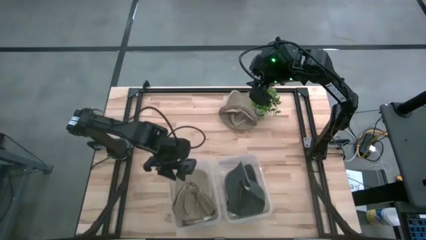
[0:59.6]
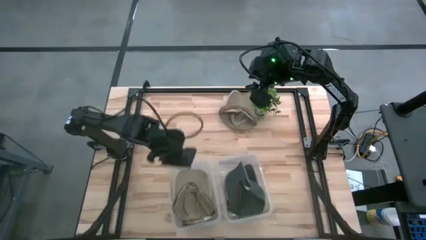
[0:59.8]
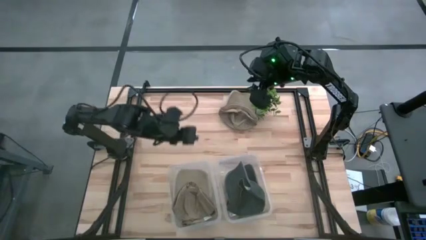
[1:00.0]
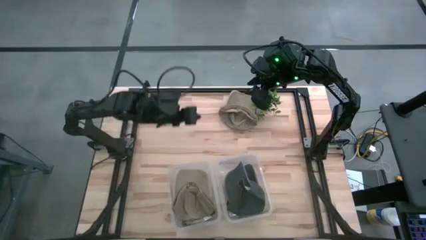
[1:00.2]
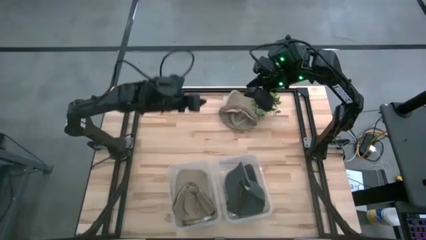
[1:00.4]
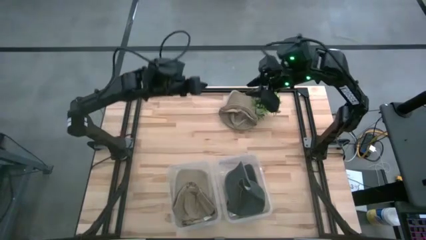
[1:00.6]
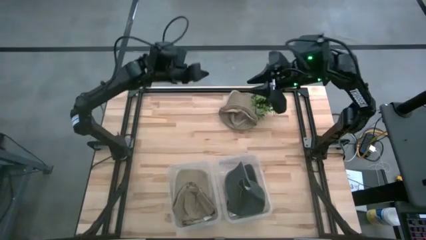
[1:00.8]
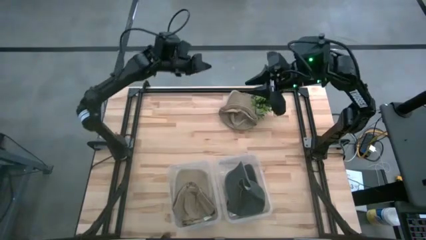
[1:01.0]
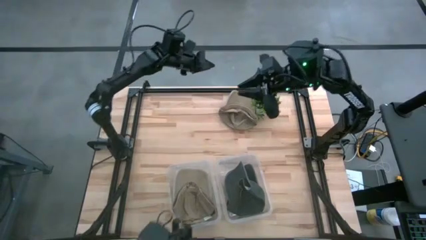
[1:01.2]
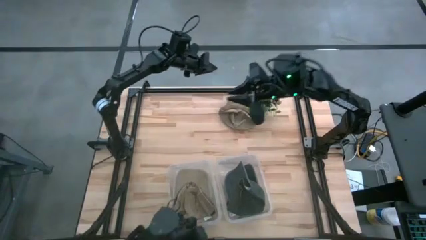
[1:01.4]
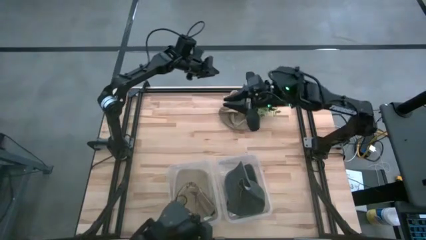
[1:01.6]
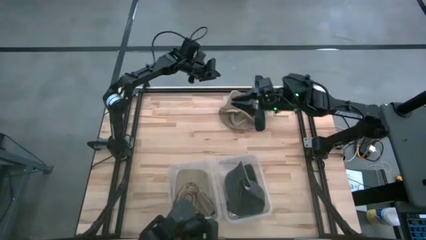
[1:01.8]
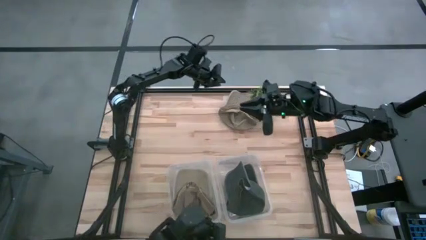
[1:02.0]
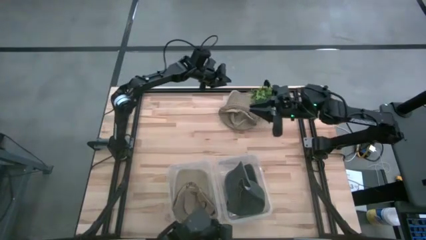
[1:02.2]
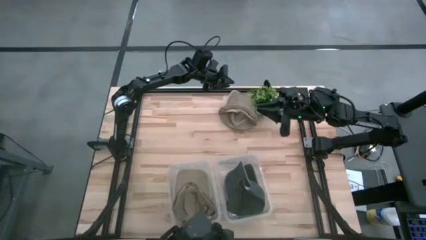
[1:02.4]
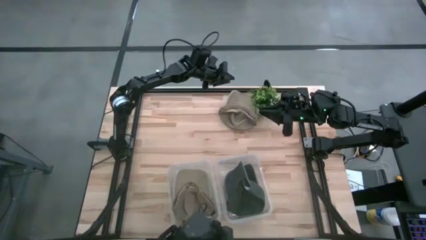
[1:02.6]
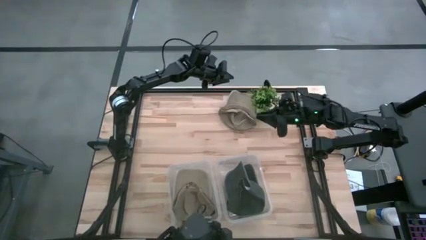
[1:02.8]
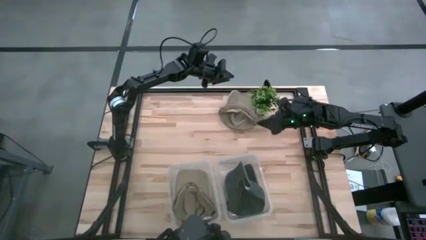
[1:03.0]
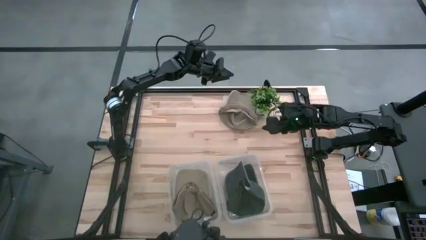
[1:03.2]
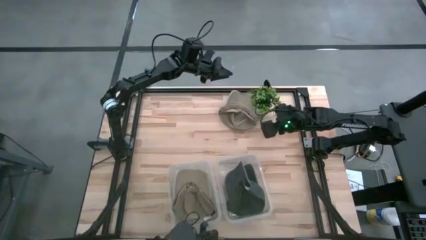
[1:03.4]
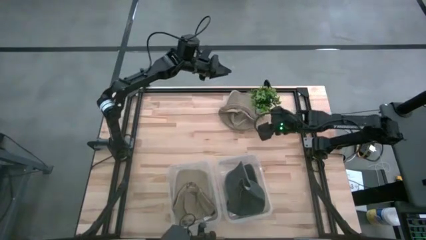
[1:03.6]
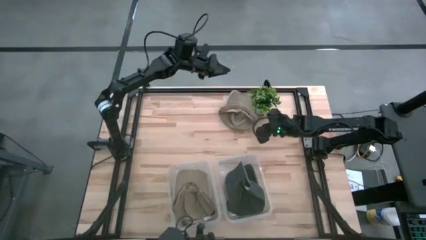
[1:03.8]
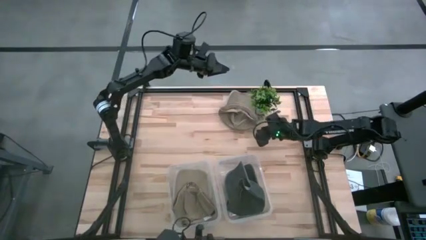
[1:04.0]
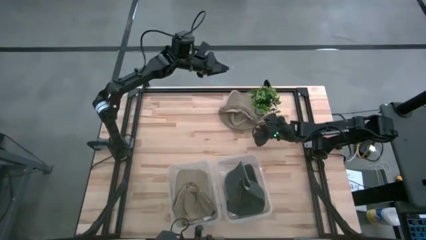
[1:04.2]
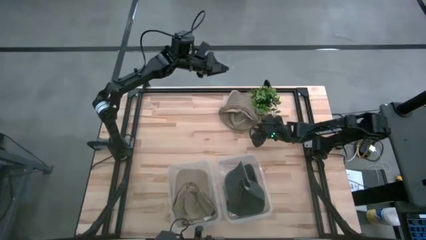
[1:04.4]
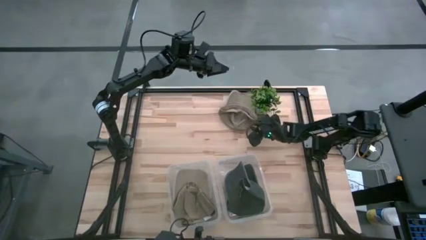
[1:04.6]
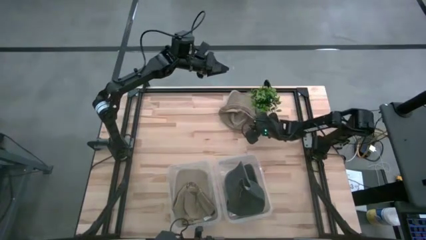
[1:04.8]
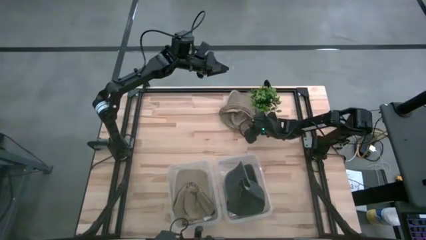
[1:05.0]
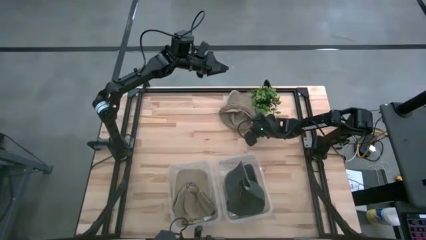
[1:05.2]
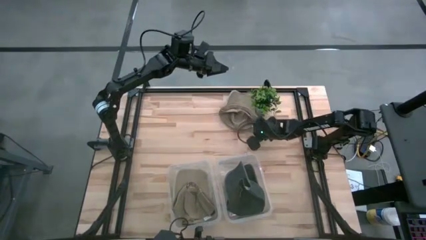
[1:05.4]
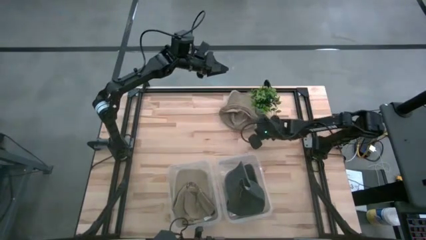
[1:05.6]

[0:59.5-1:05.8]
Task: Pick & Place hat
Put the brown cap into the left transparent bin

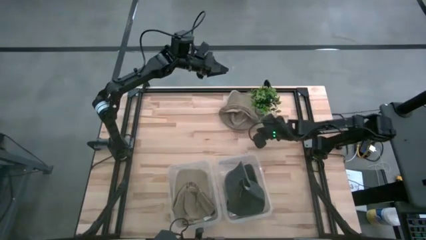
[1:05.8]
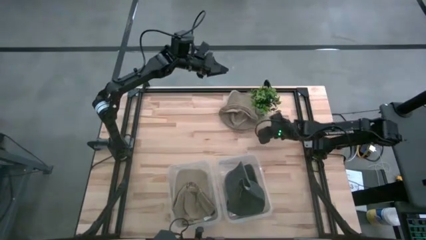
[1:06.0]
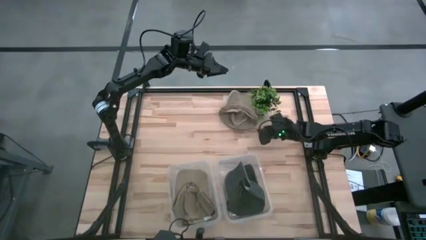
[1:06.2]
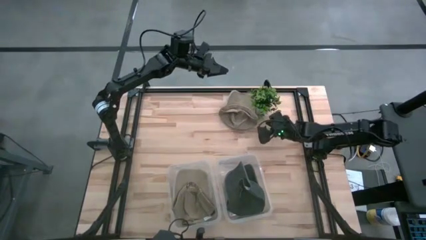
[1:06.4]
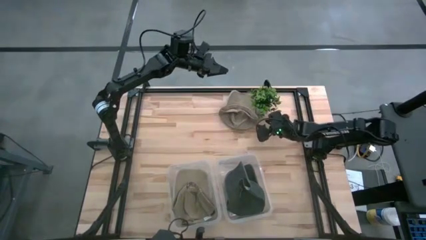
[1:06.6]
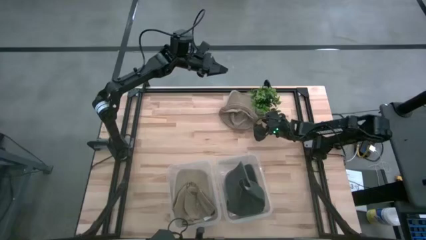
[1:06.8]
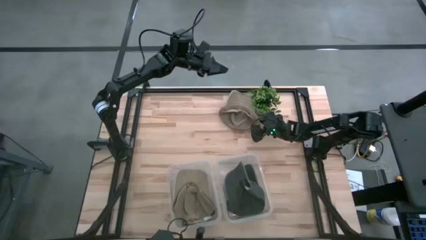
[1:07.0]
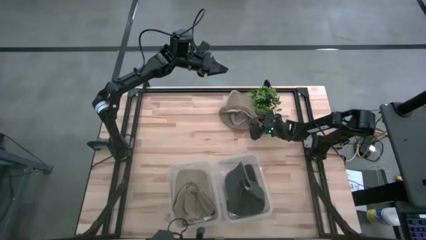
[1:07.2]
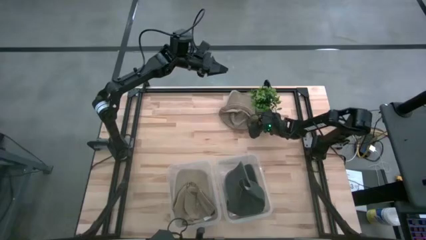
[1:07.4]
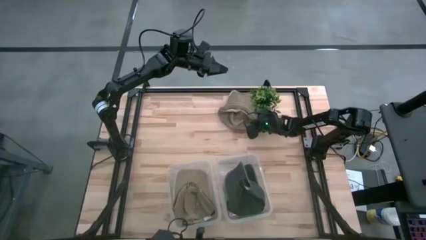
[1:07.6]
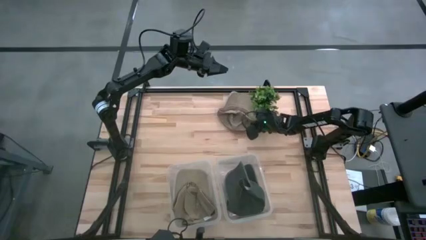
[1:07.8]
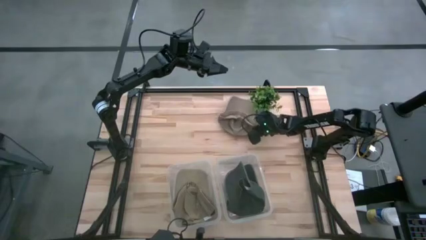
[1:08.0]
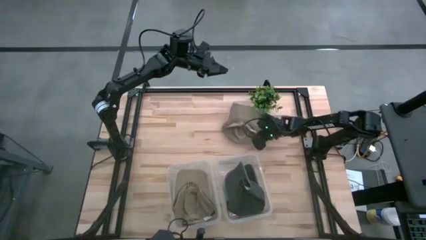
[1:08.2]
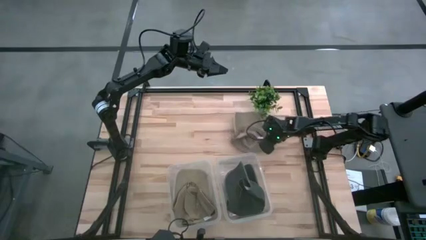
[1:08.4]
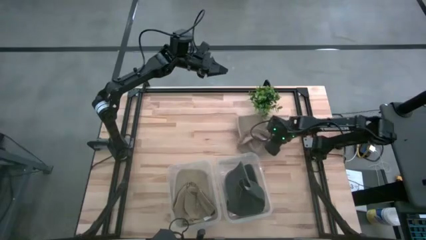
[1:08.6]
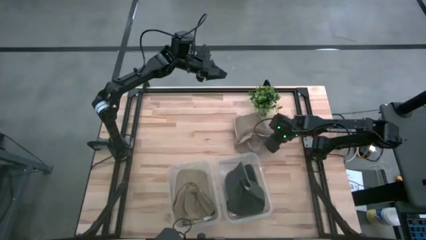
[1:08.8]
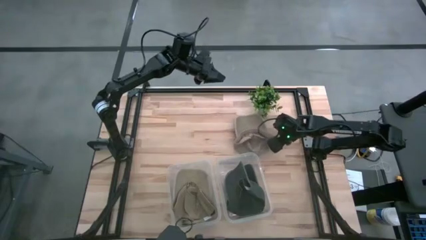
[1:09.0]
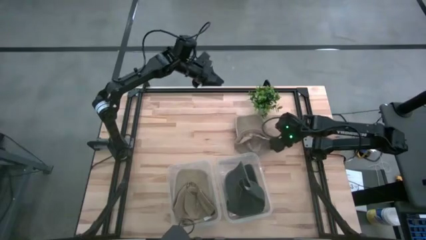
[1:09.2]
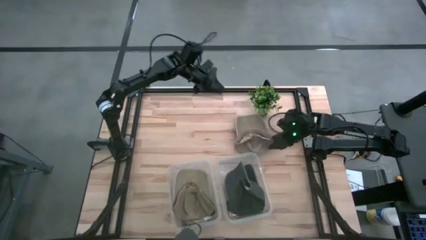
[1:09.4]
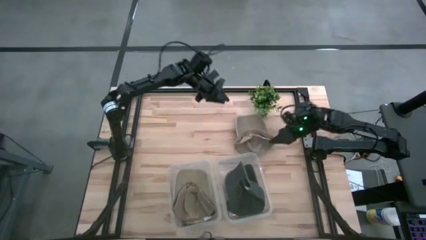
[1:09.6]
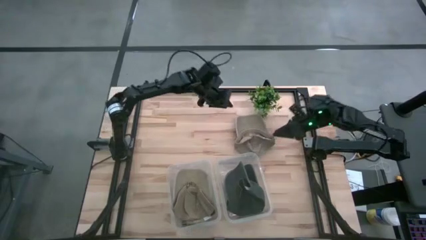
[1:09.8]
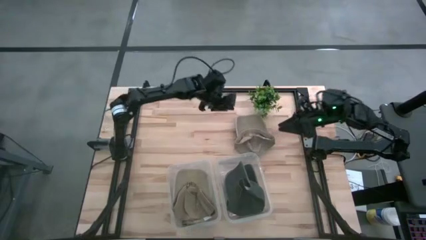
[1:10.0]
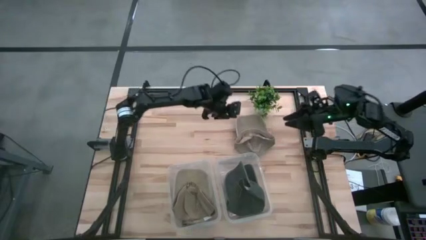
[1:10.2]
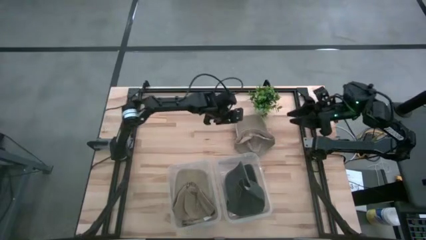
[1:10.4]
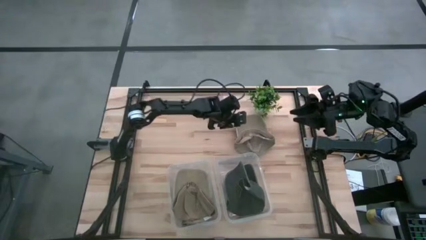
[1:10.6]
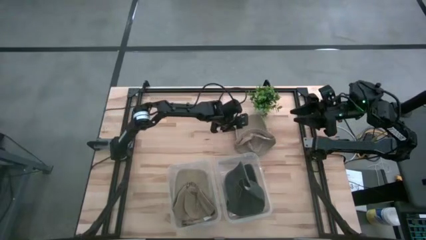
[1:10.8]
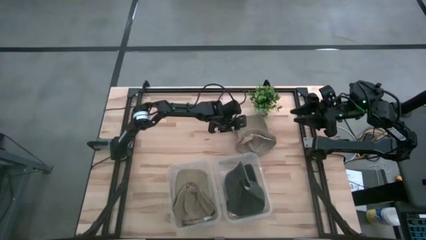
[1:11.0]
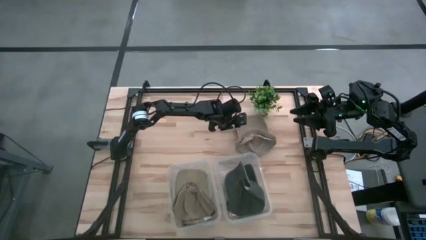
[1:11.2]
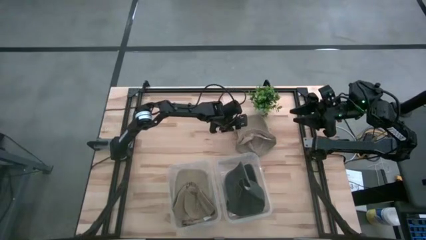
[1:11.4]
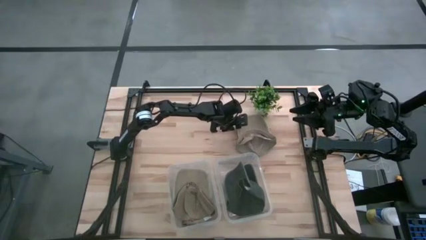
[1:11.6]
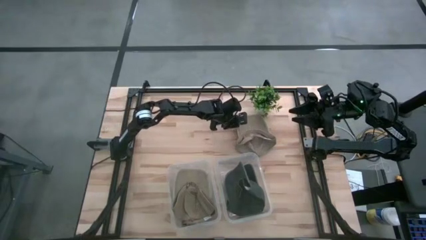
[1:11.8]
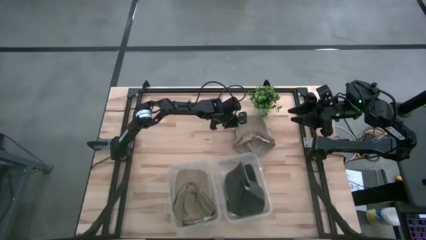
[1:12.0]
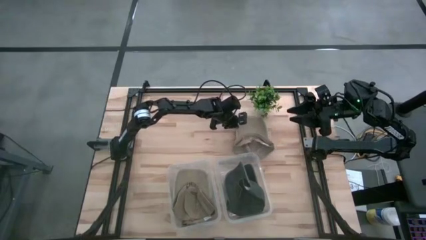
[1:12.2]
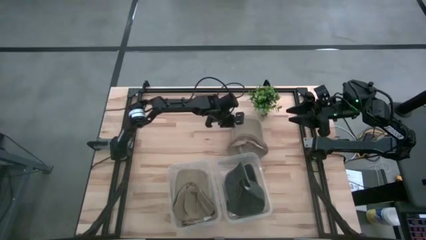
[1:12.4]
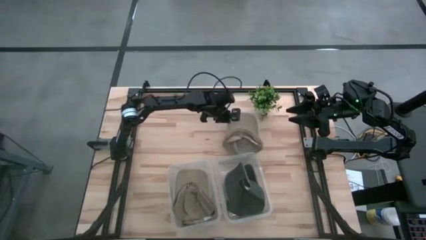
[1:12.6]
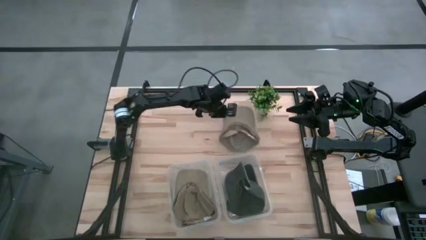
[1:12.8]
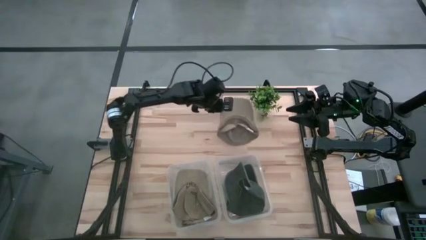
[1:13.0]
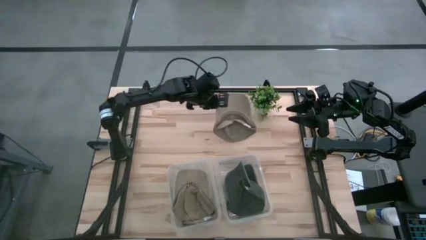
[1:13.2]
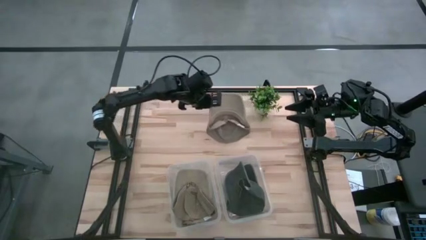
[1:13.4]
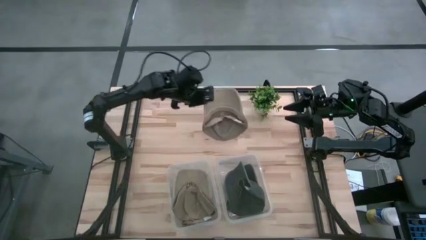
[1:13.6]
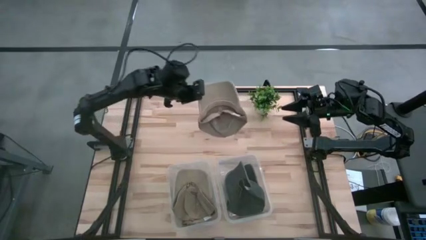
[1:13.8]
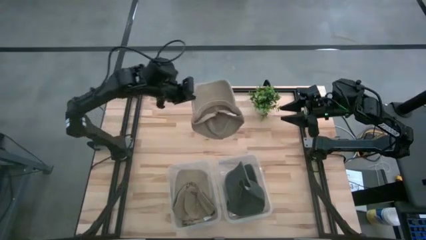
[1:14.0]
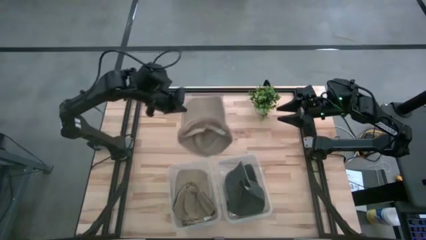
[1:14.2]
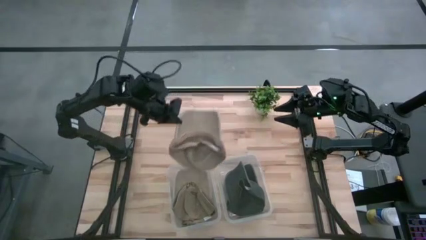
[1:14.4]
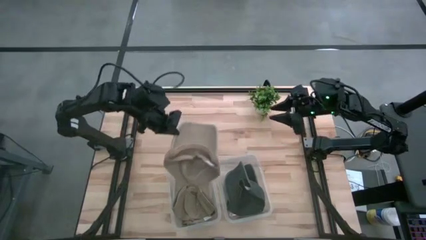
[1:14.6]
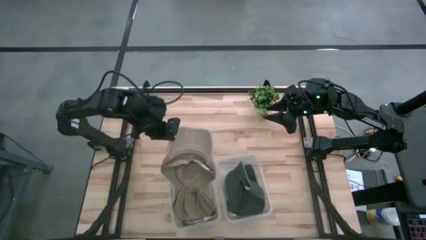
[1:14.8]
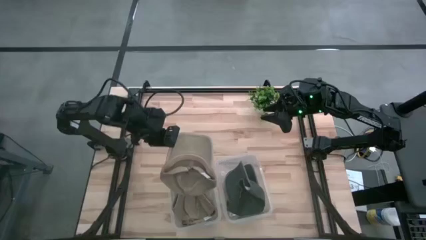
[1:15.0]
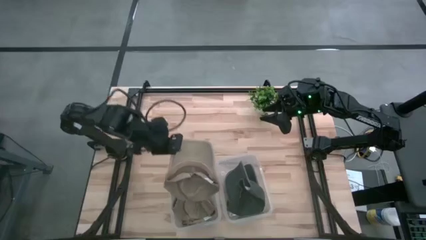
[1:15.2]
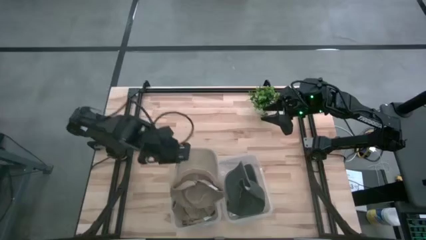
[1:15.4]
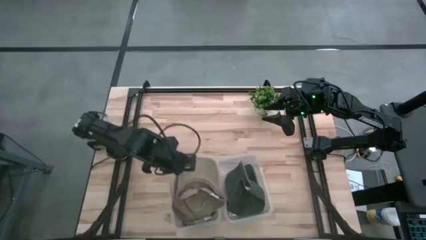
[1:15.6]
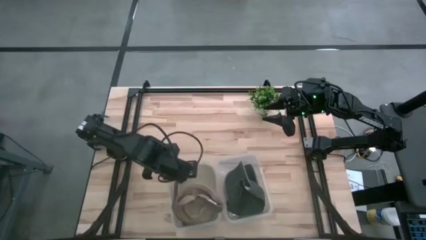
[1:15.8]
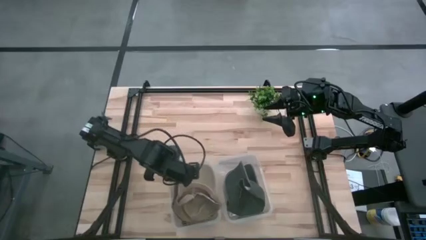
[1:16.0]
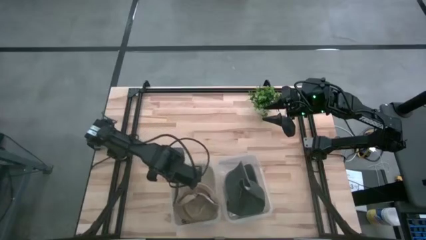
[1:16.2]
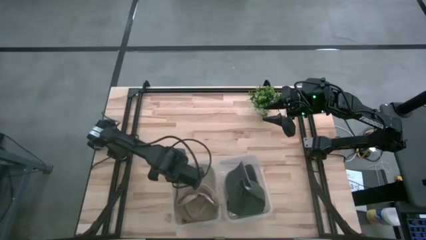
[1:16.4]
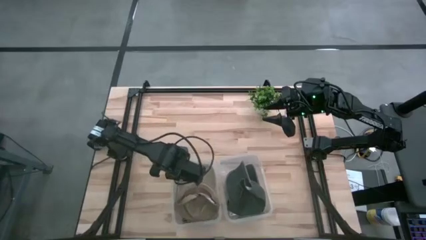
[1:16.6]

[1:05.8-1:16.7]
Put the brown cap into the left transparent bin
